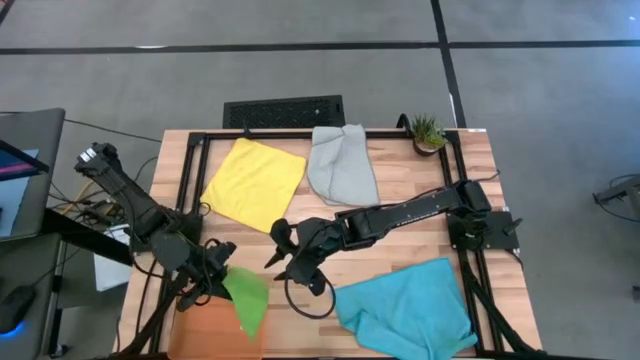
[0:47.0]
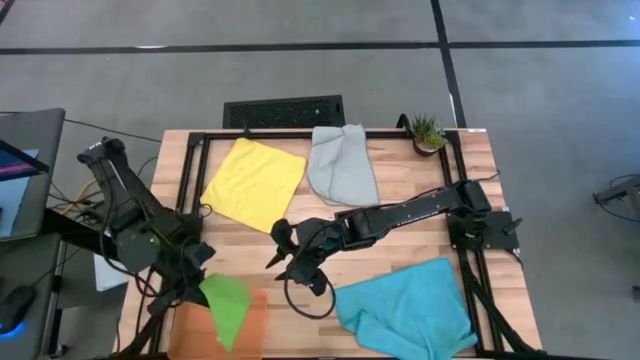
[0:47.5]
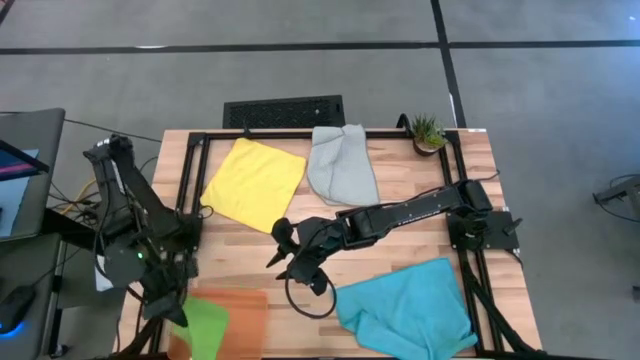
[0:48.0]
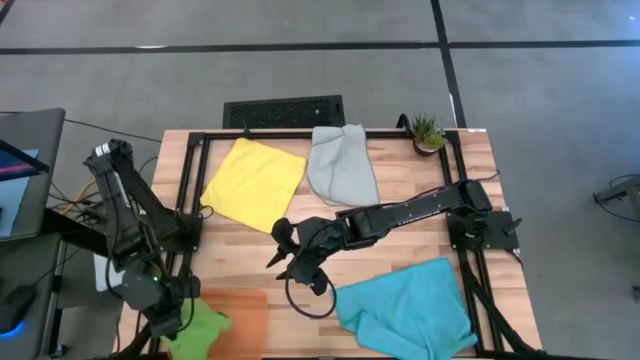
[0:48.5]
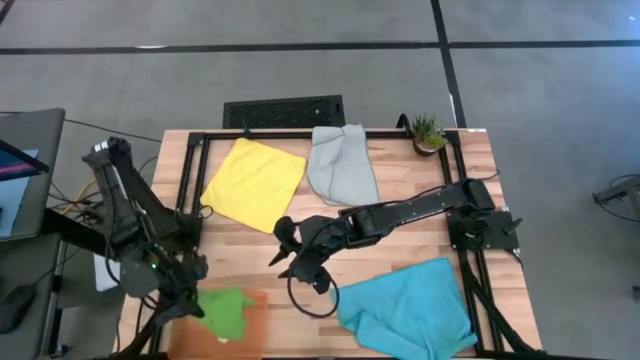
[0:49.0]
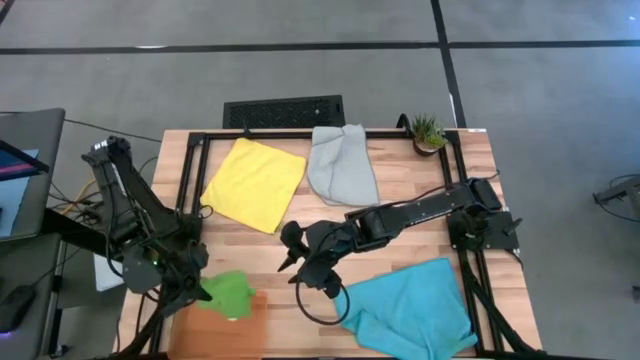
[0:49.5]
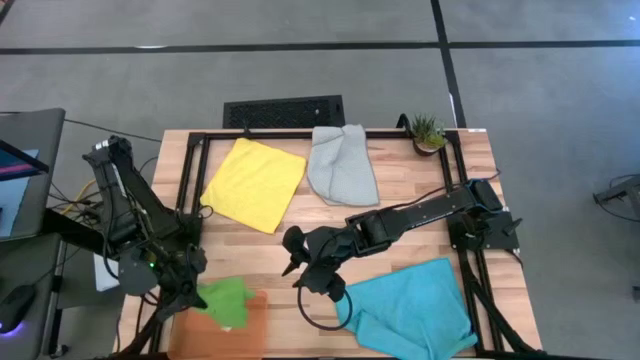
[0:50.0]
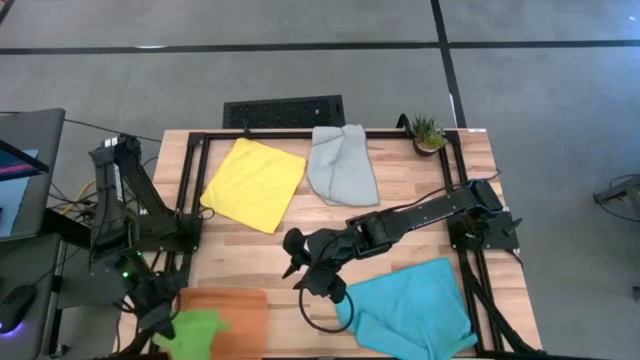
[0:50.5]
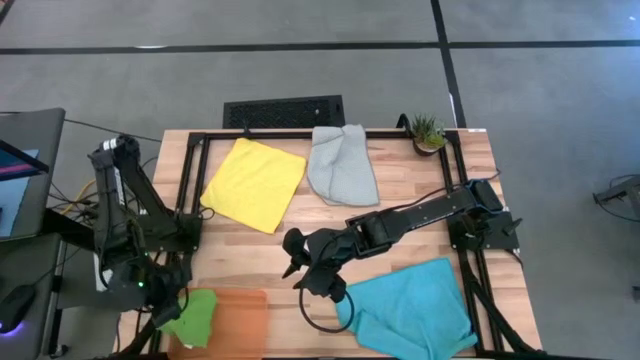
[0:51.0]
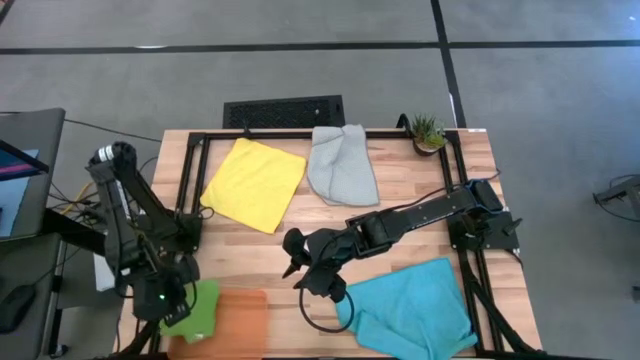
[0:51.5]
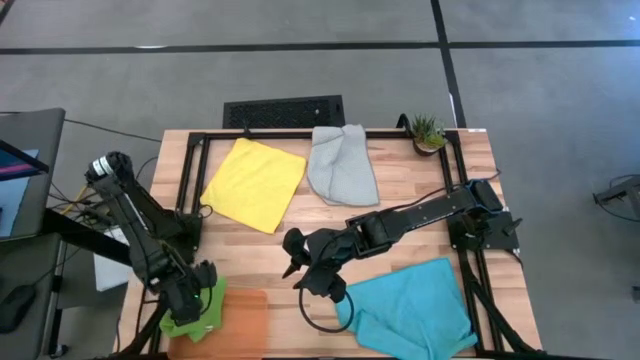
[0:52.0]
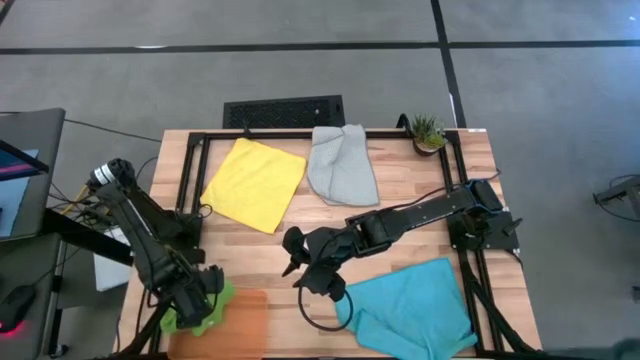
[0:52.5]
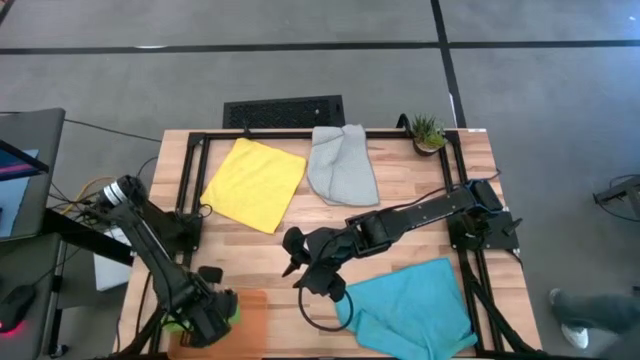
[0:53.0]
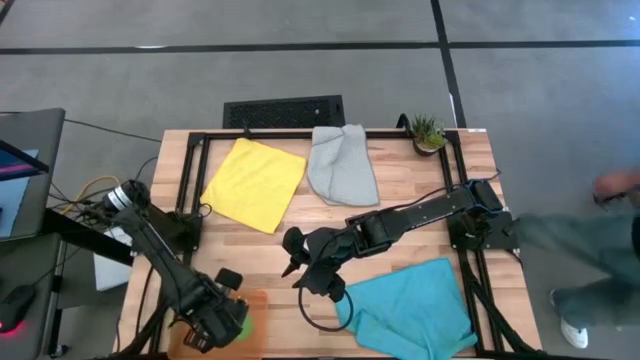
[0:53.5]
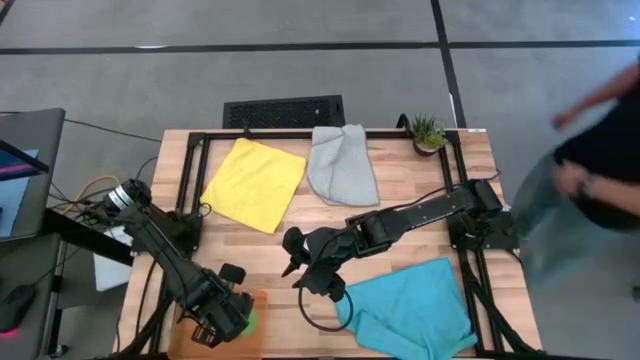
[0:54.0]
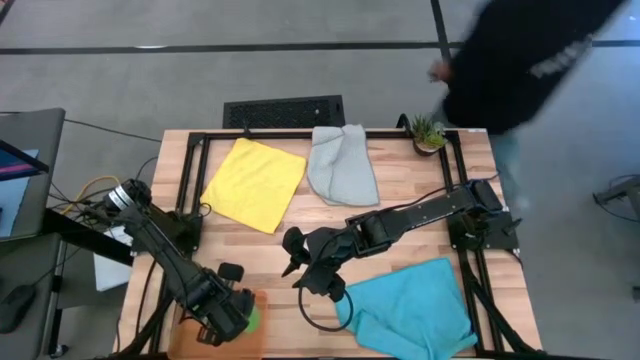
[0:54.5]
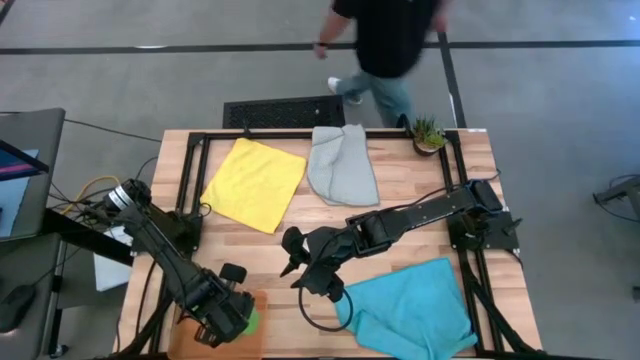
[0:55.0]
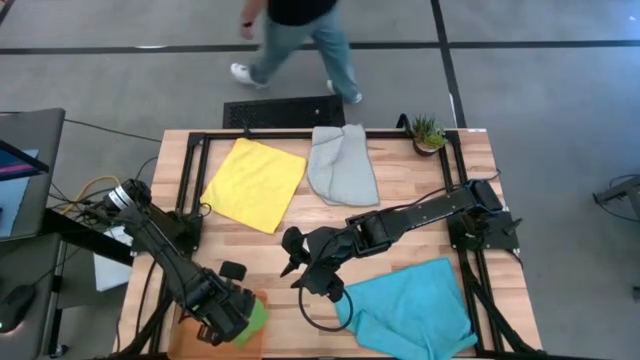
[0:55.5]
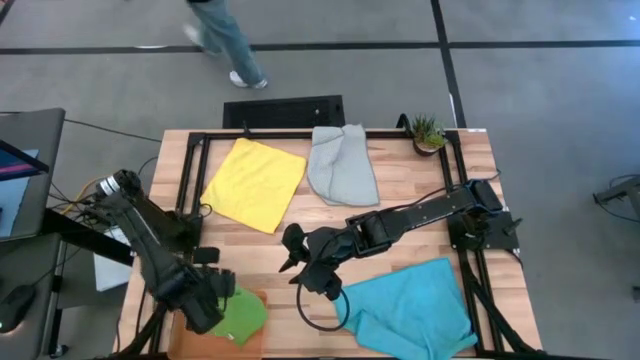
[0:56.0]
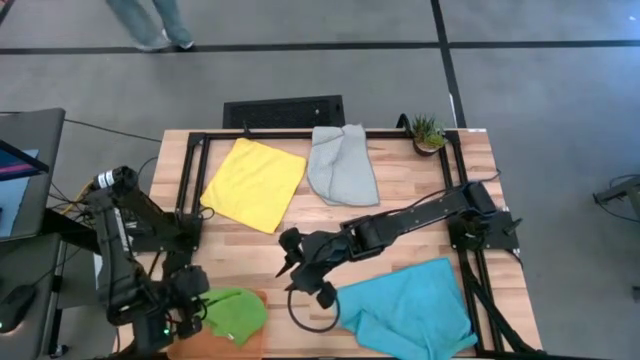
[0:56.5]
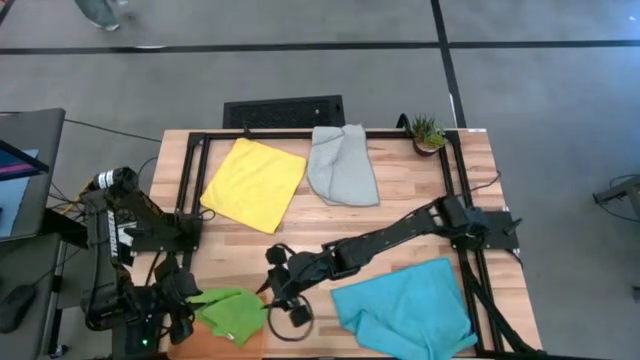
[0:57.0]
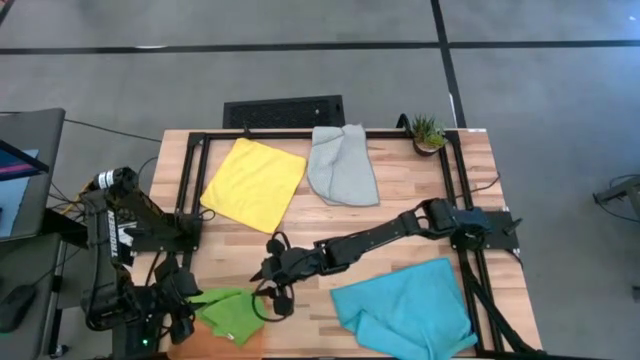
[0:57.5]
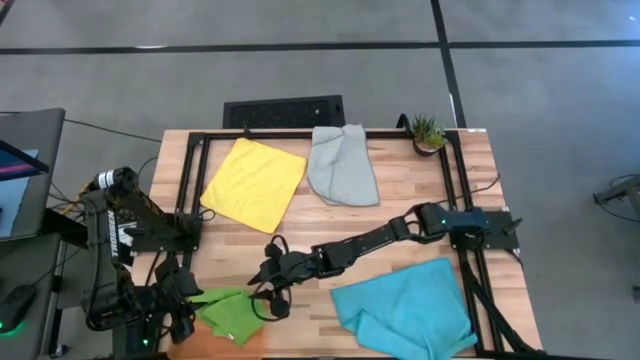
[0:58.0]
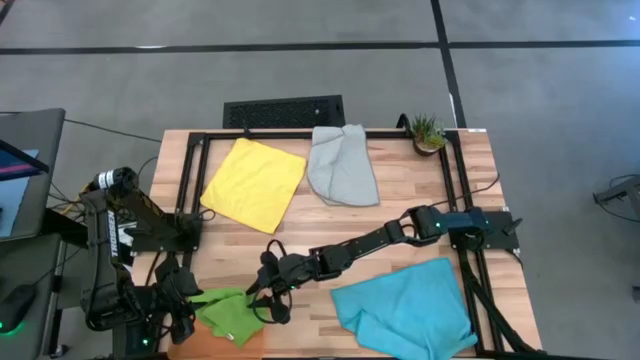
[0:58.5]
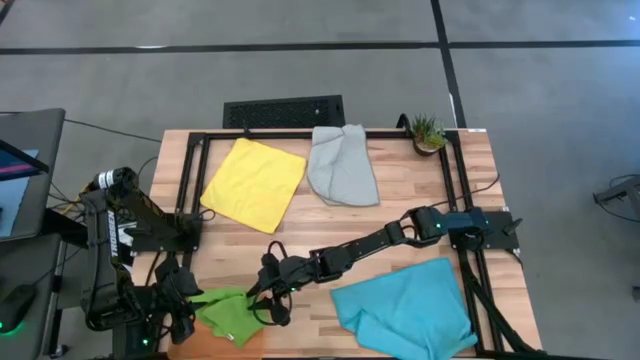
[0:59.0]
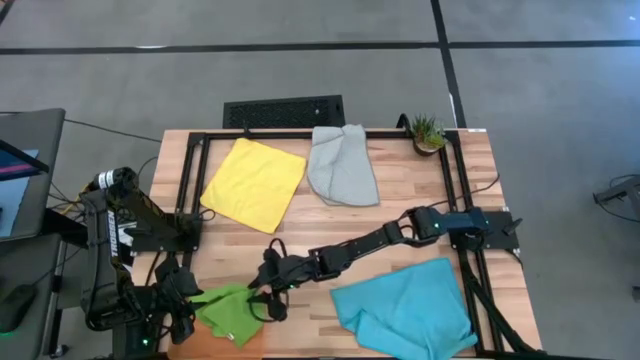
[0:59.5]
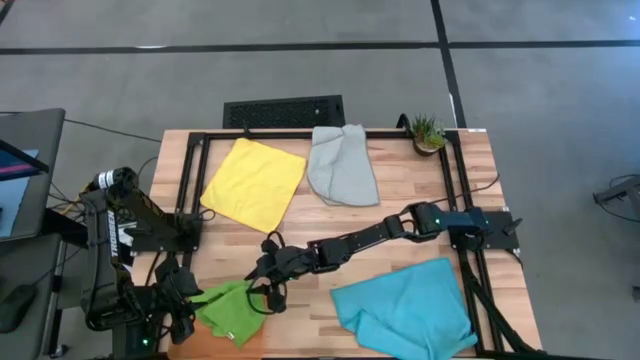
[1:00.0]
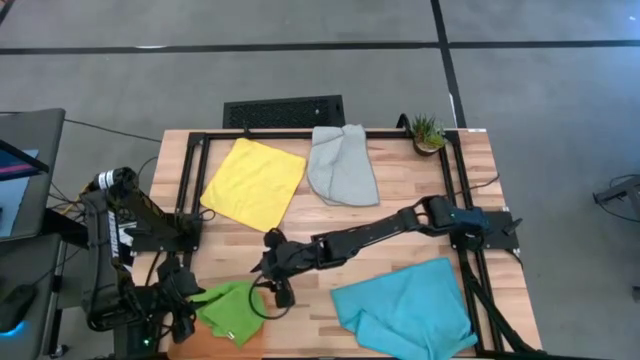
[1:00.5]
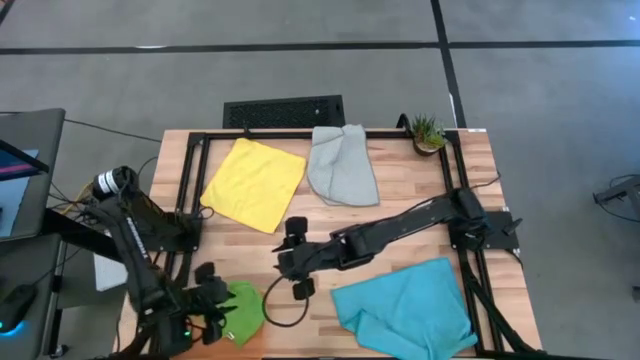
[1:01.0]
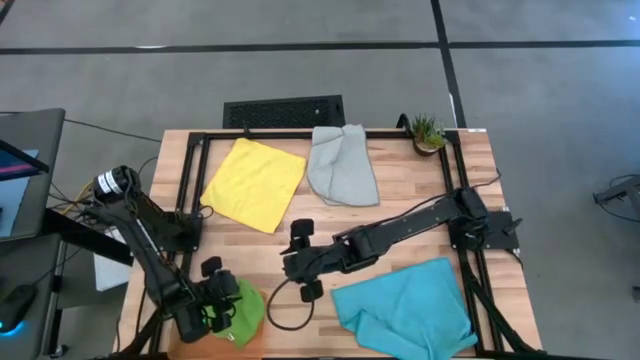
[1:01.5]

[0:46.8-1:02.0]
Task: Fold microfiber towels
Put the folded green towel into the orange bin
